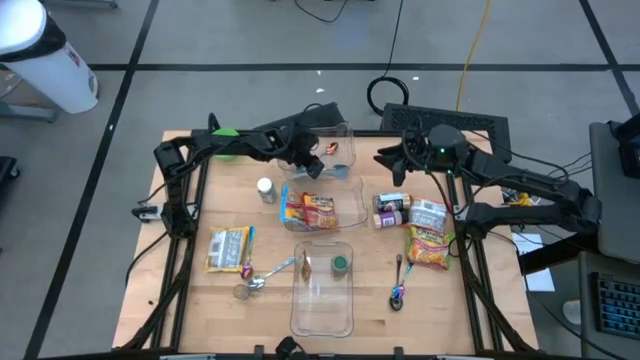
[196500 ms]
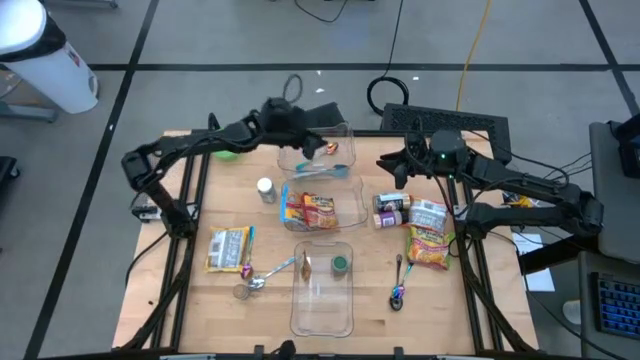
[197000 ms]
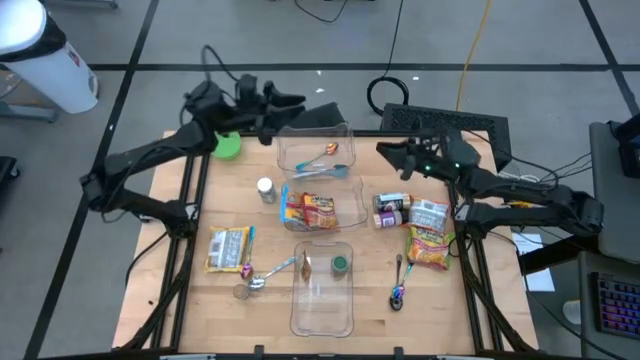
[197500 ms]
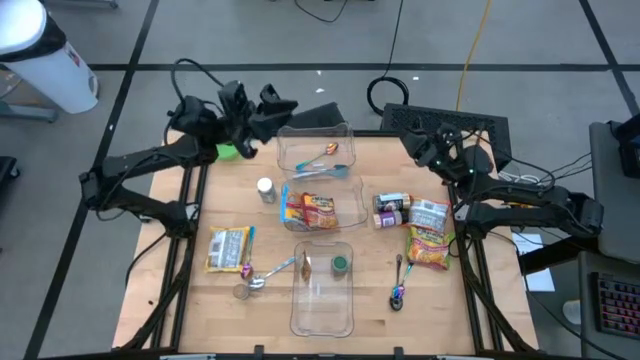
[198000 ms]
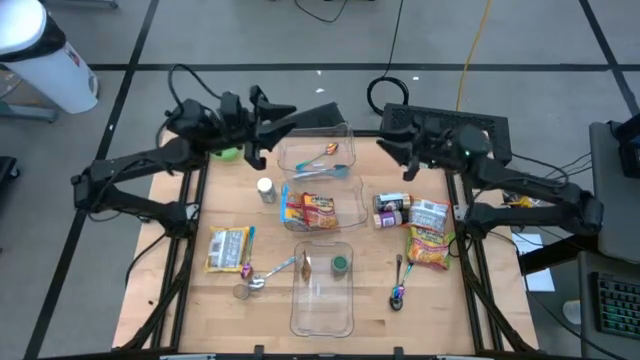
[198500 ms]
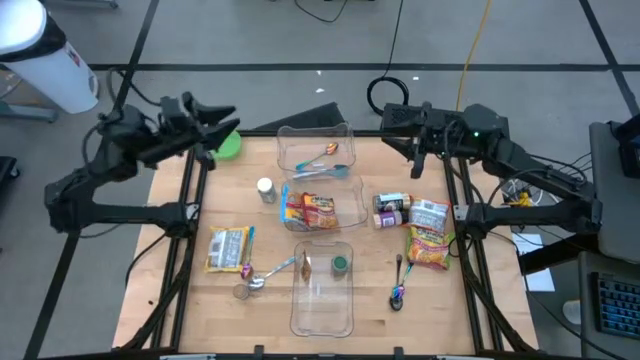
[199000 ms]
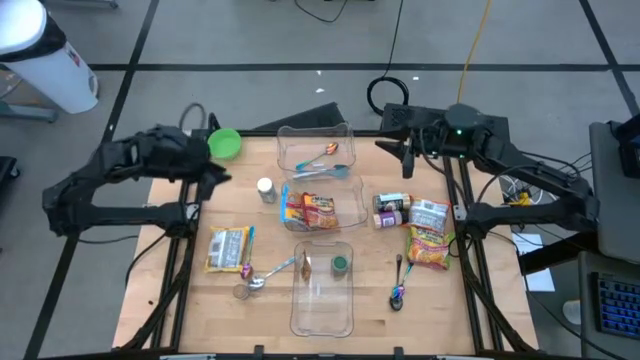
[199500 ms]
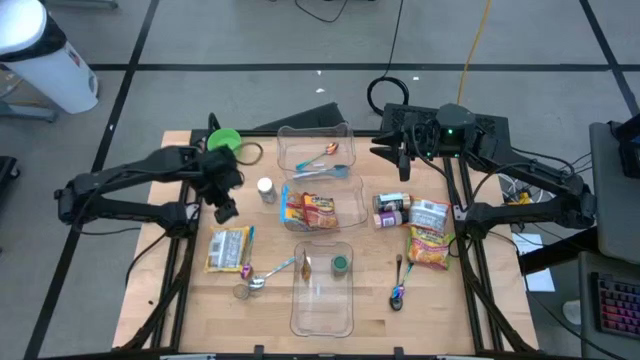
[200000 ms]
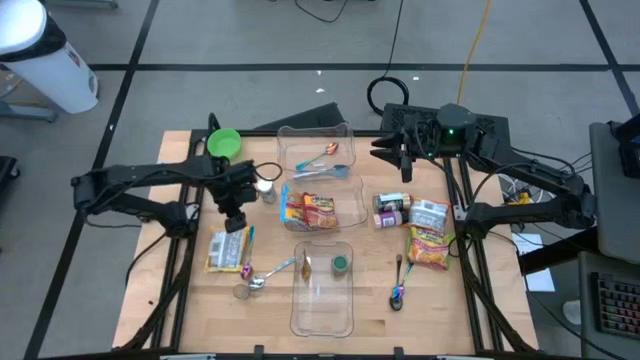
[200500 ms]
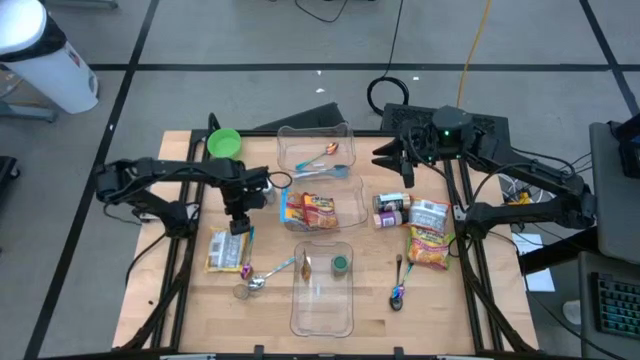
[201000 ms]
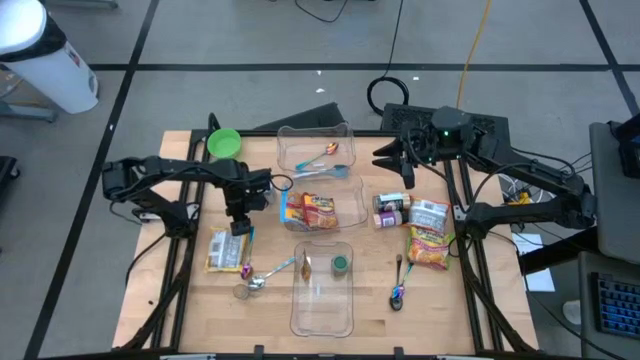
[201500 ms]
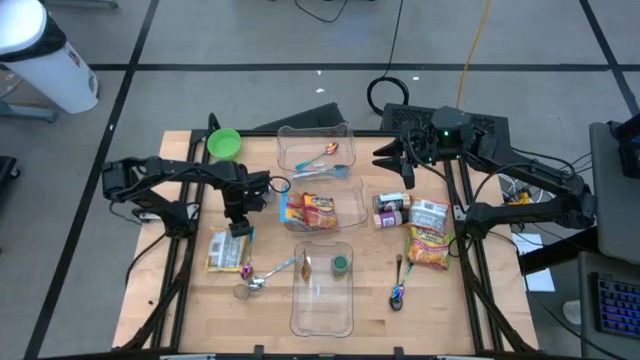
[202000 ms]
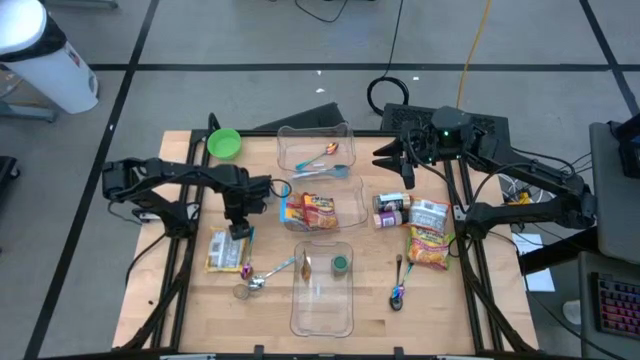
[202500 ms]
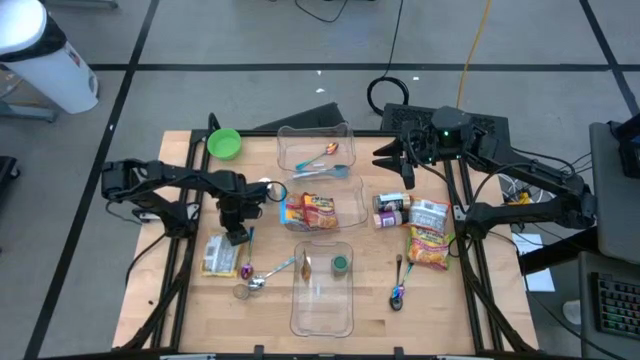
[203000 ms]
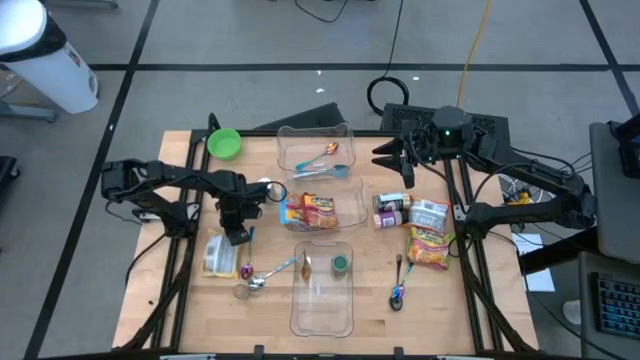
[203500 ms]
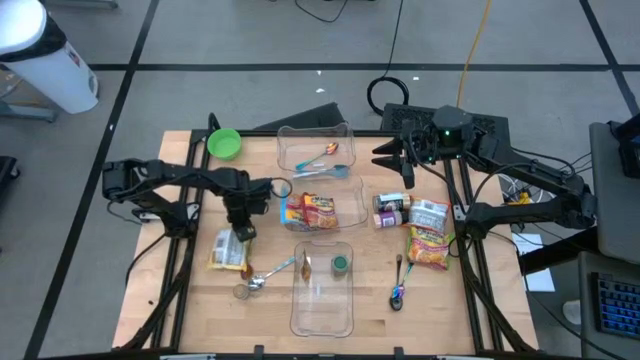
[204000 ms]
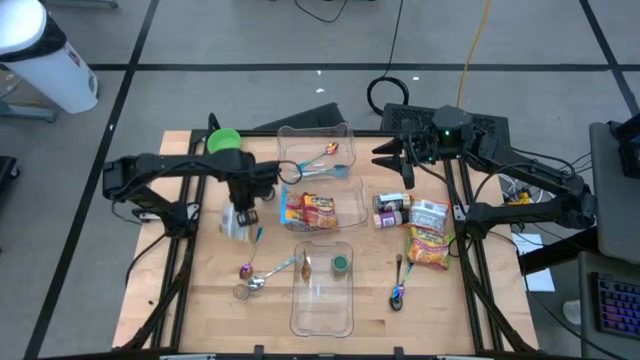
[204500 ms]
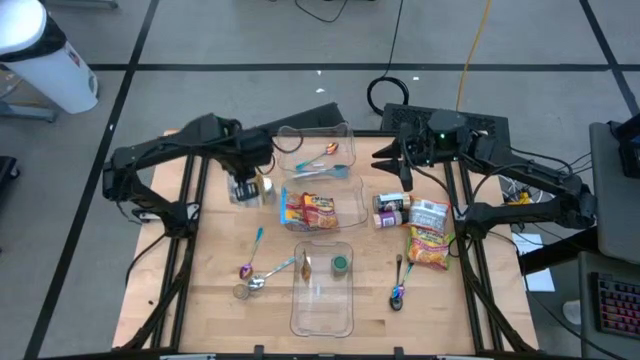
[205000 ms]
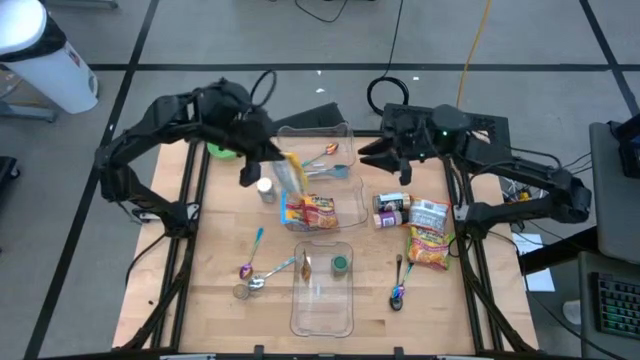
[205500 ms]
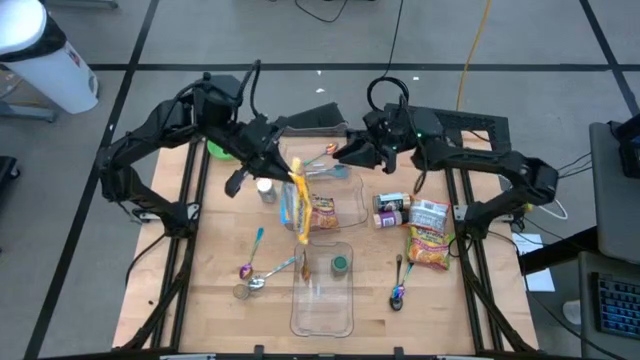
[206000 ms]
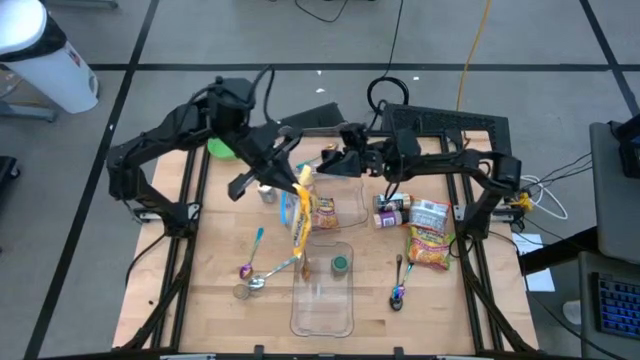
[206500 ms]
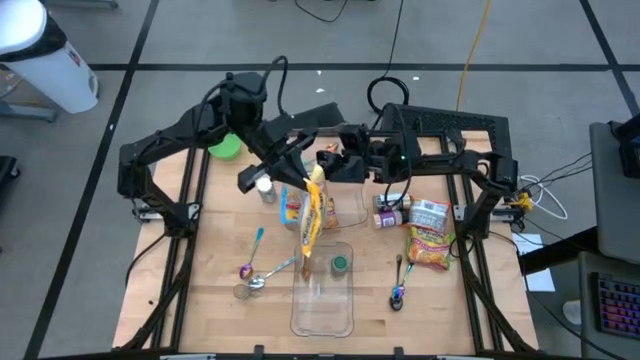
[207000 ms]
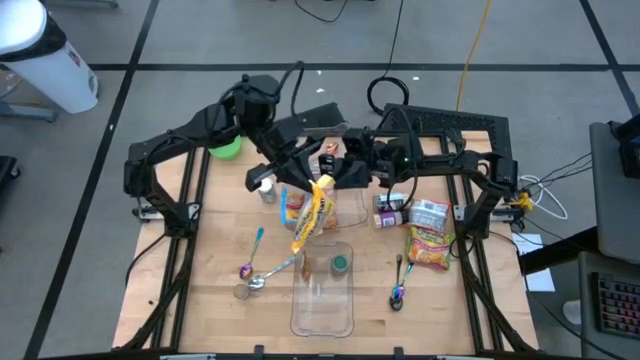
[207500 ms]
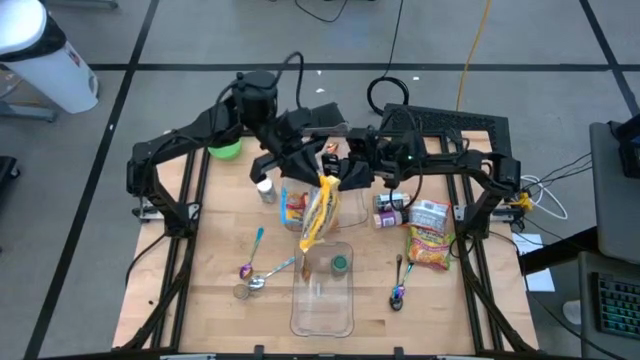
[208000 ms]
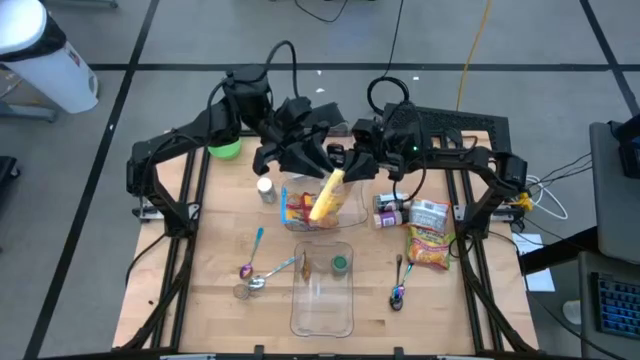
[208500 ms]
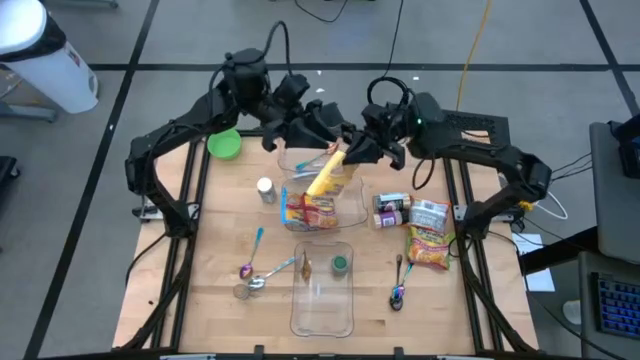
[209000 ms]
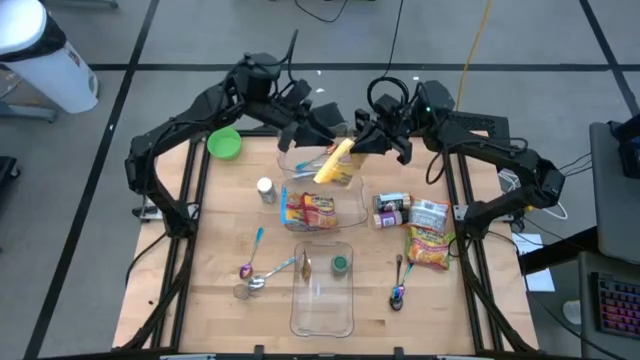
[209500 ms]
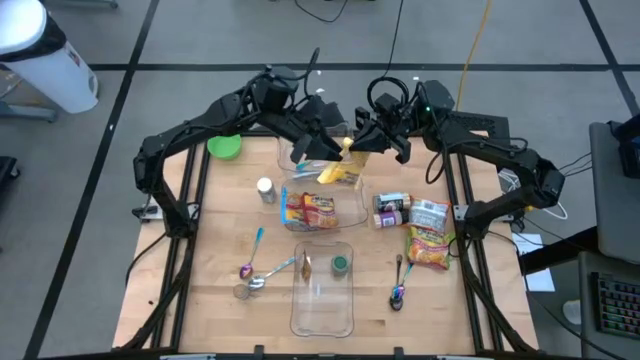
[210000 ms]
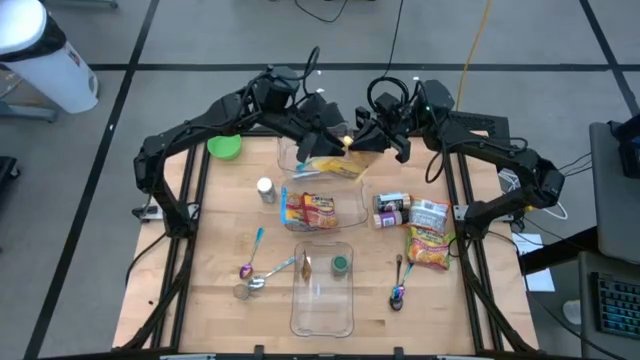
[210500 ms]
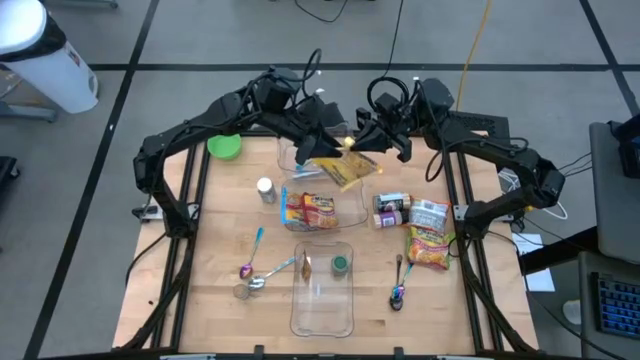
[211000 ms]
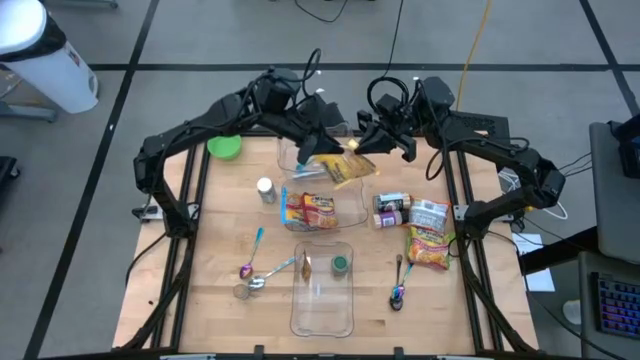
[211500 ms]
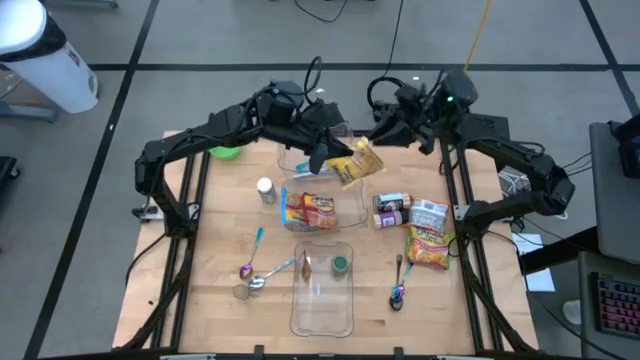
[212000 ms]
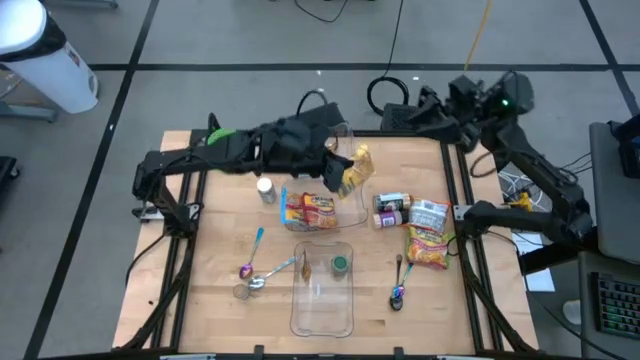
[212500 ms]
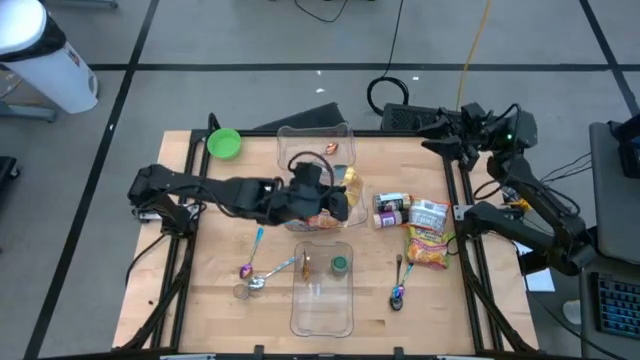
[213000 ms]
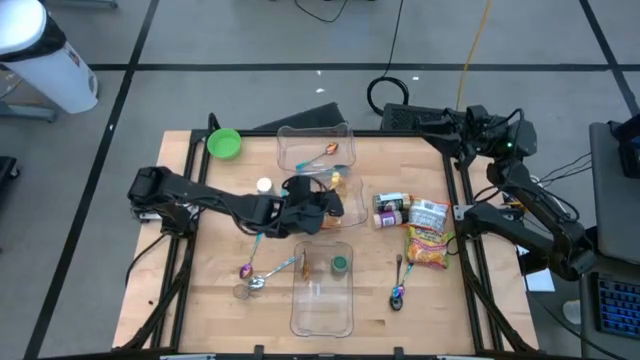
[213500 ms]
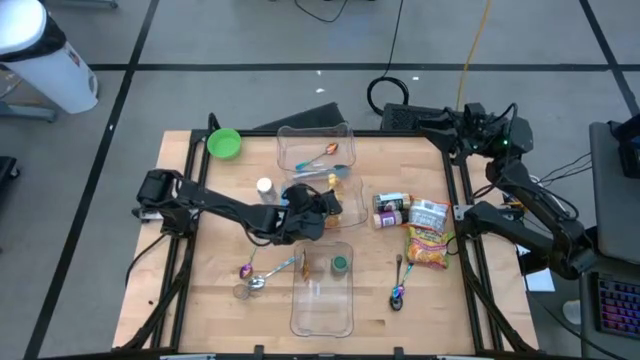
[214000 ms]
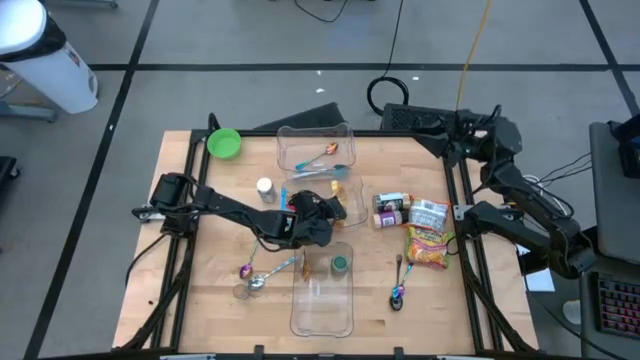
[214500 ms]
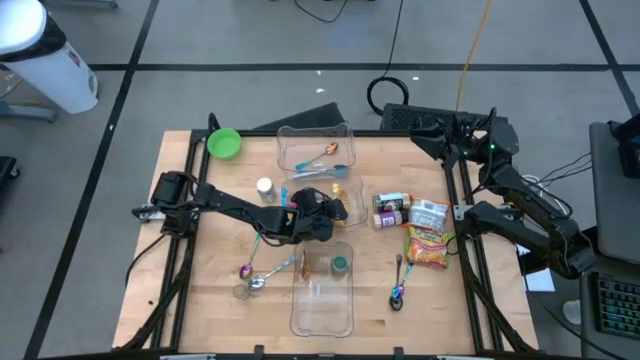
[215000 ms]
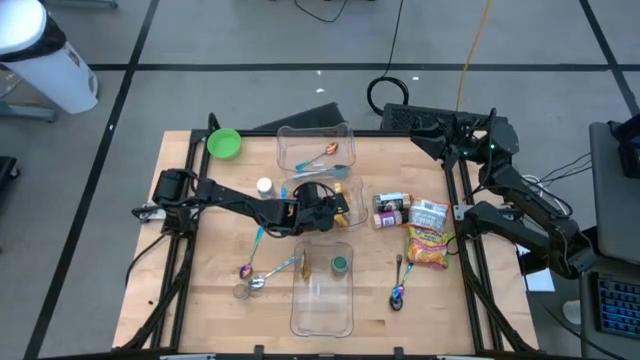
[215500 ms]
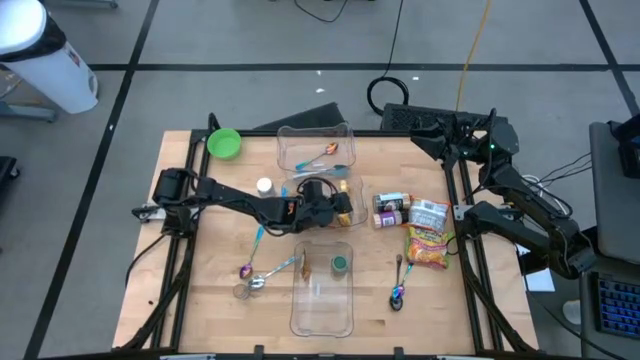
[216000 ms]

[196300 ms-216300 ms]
Task: Pick & Place Food Item
Put the yellow noodle pack into the middle transparent bin

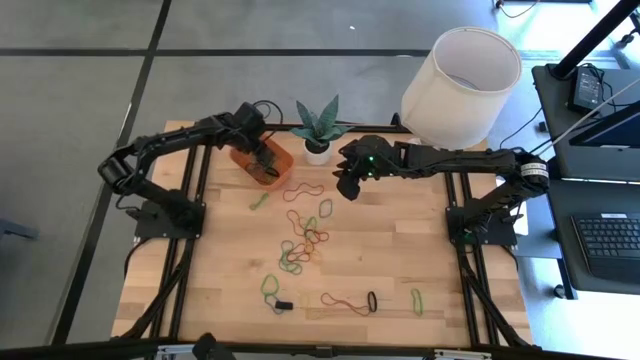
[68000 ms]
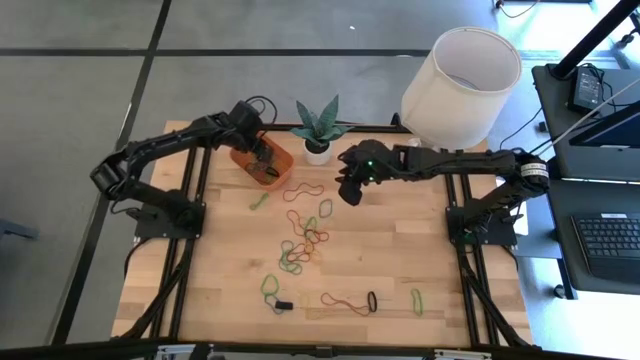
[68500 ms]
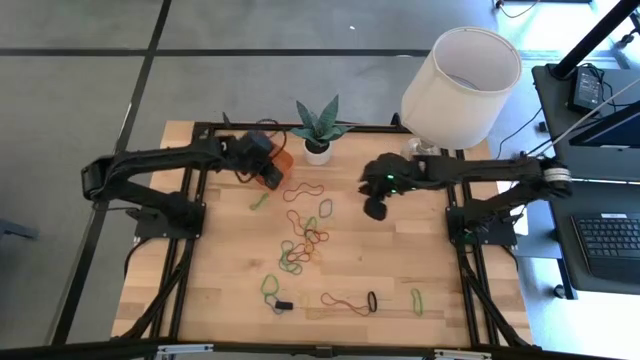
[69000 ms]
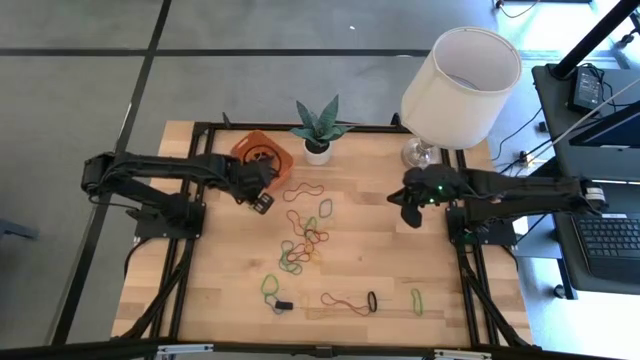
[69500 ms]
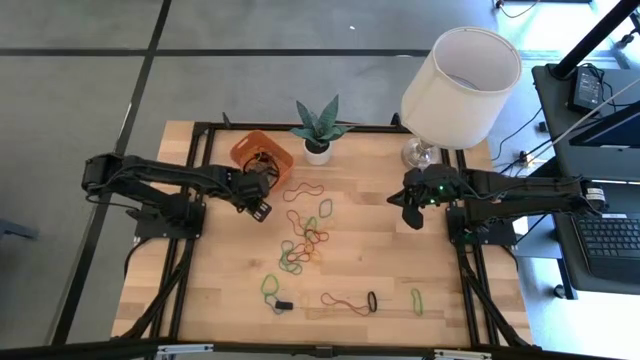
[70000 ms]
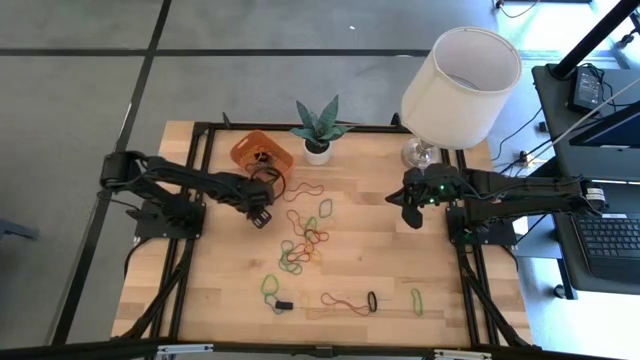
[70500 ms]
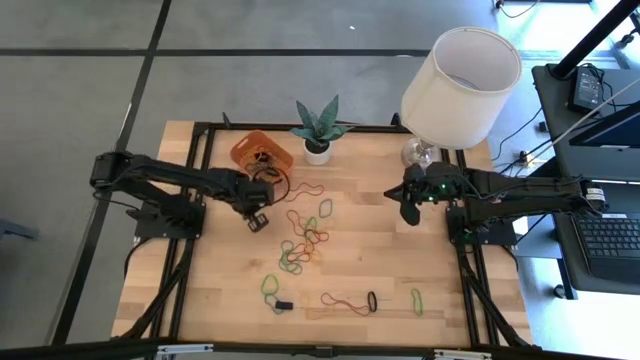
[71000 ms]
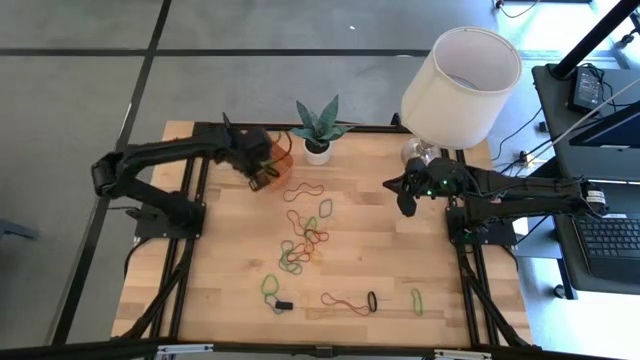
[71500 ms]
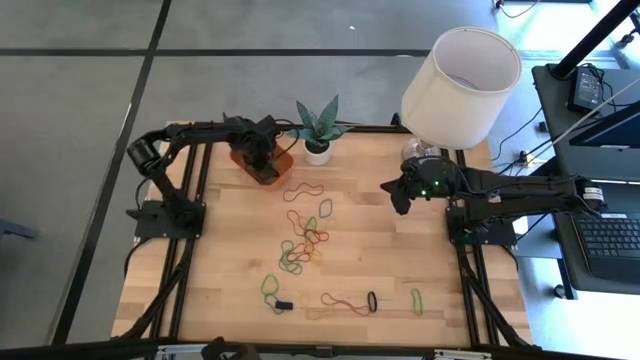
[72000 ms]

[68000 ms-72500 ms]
Task: Pick and place rubber bands into bin
Put the green rubber band into the orange bin
